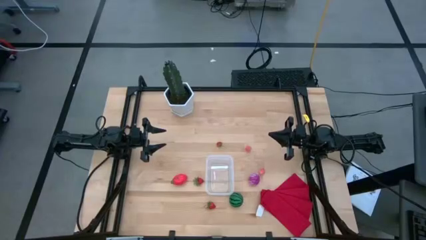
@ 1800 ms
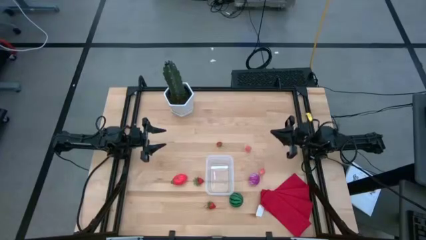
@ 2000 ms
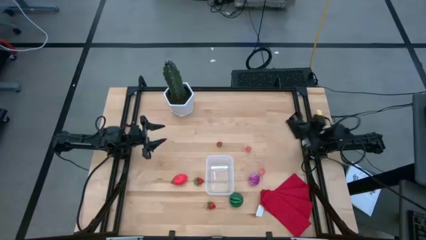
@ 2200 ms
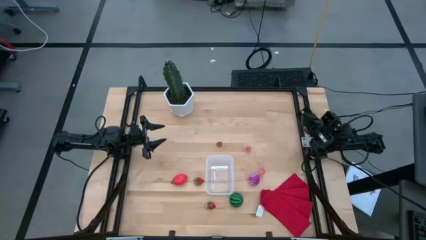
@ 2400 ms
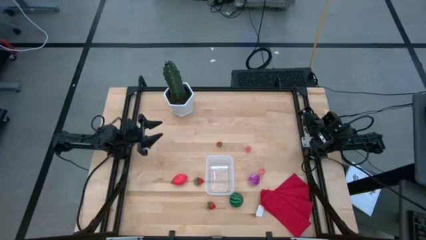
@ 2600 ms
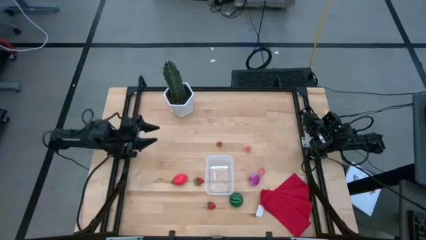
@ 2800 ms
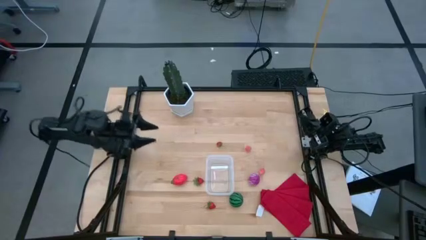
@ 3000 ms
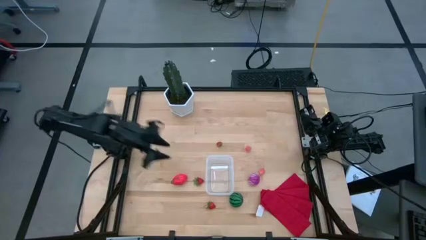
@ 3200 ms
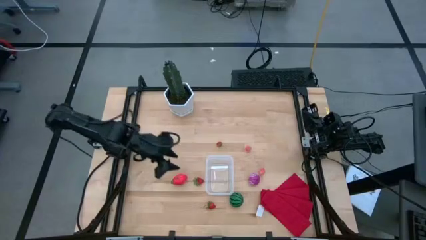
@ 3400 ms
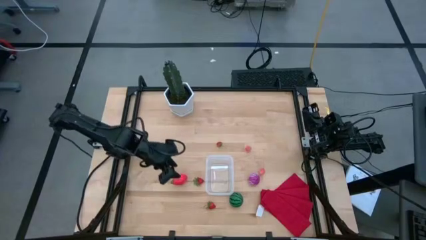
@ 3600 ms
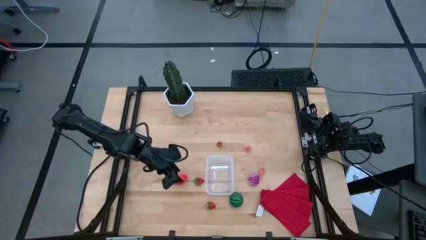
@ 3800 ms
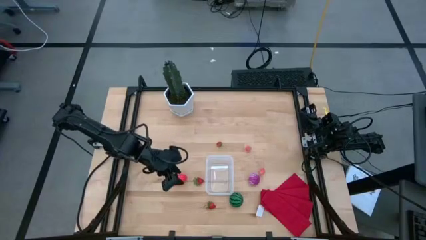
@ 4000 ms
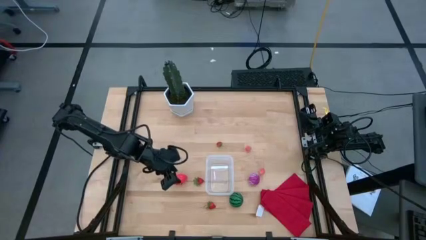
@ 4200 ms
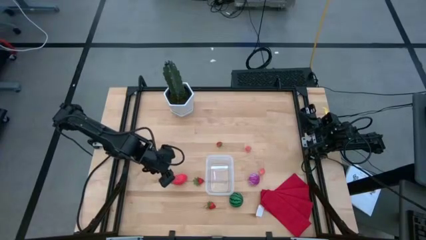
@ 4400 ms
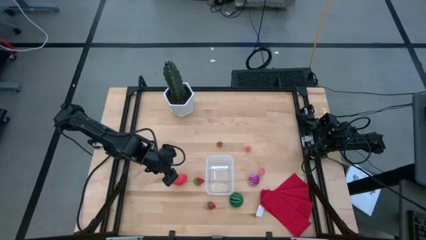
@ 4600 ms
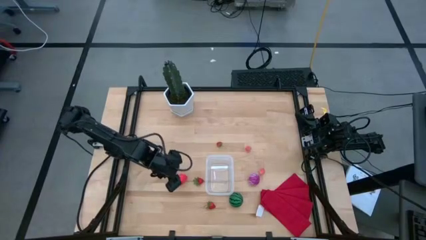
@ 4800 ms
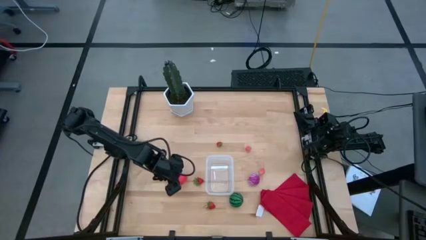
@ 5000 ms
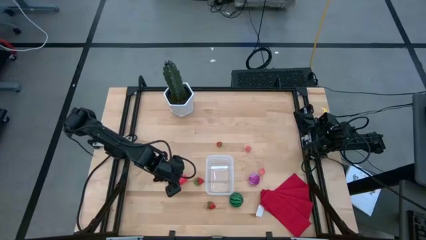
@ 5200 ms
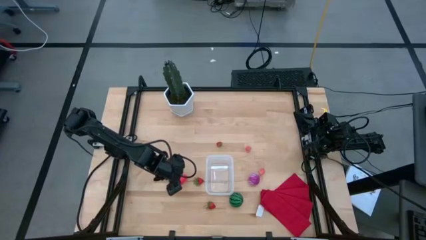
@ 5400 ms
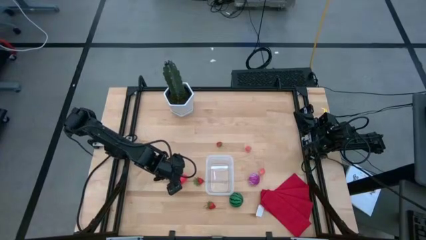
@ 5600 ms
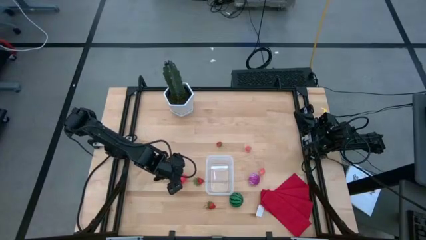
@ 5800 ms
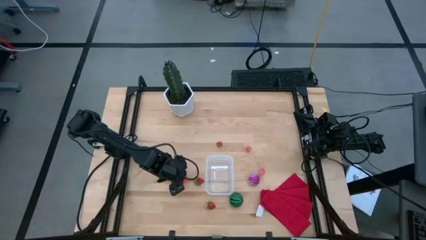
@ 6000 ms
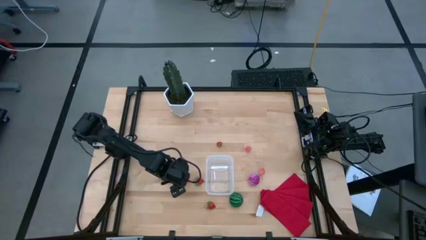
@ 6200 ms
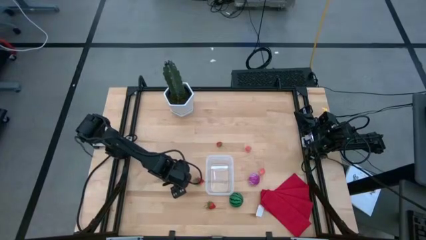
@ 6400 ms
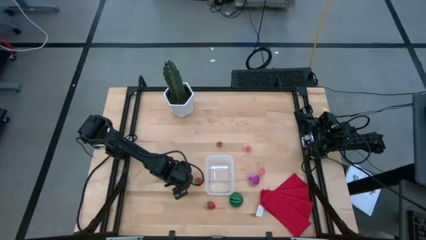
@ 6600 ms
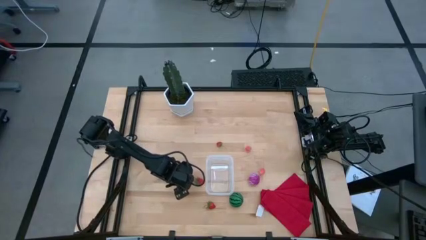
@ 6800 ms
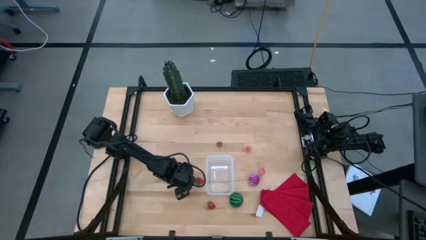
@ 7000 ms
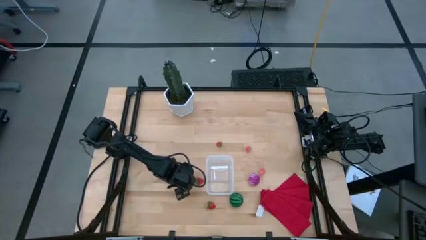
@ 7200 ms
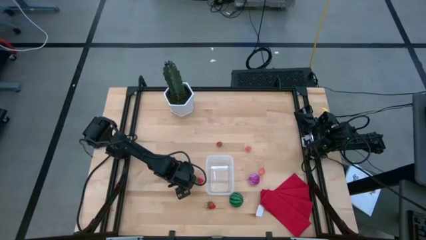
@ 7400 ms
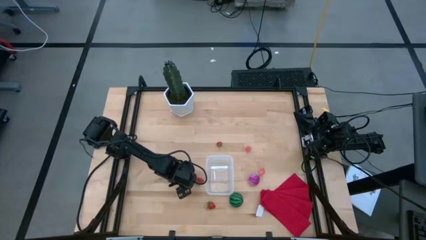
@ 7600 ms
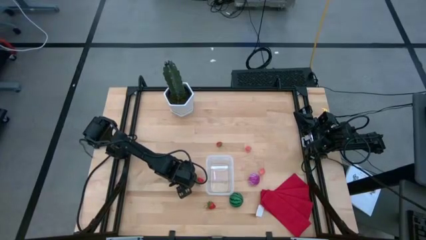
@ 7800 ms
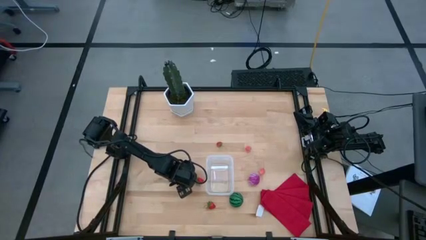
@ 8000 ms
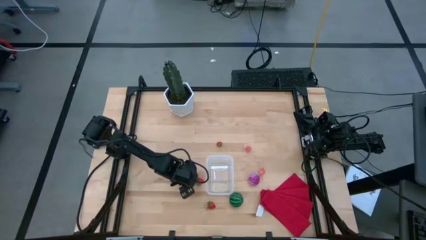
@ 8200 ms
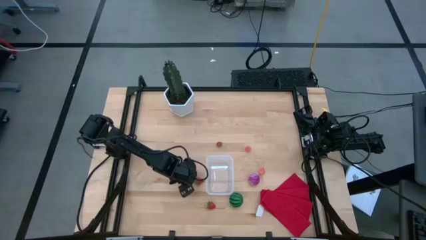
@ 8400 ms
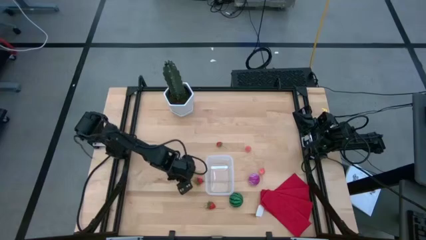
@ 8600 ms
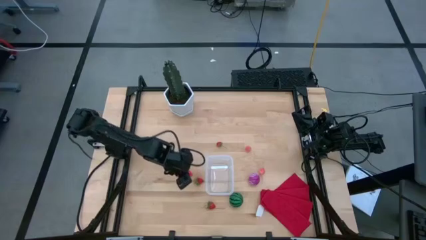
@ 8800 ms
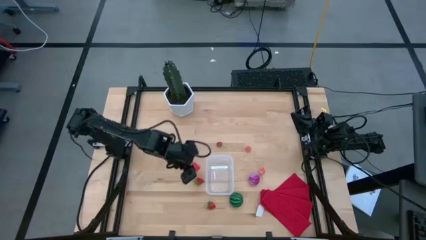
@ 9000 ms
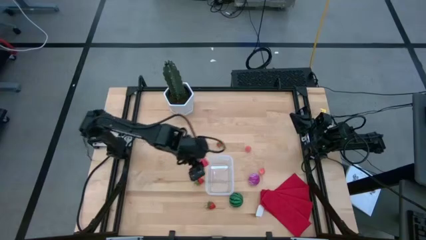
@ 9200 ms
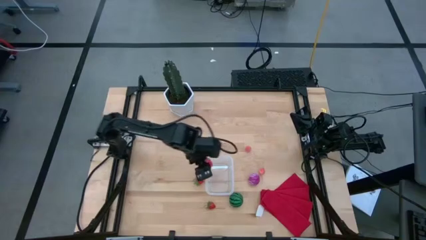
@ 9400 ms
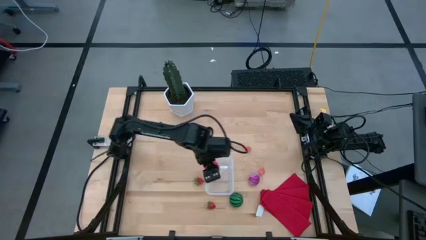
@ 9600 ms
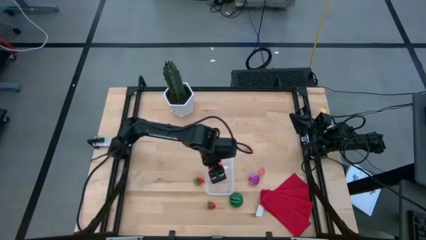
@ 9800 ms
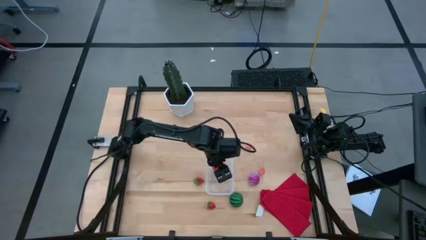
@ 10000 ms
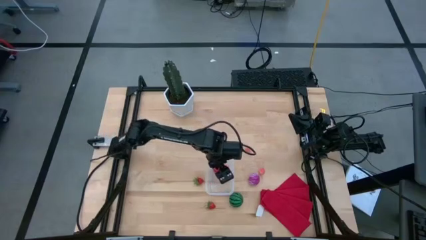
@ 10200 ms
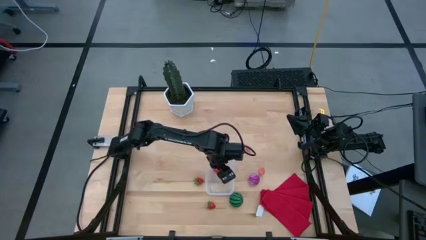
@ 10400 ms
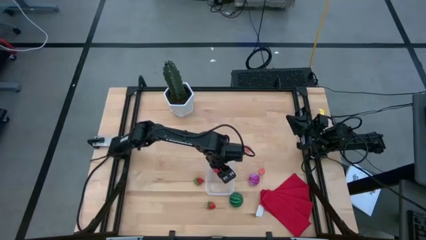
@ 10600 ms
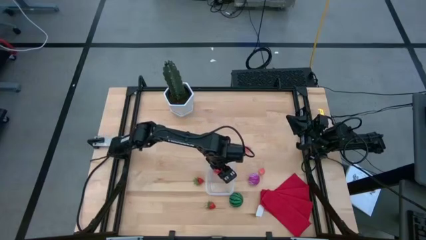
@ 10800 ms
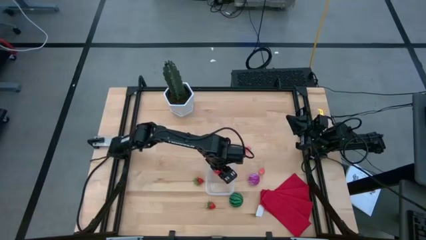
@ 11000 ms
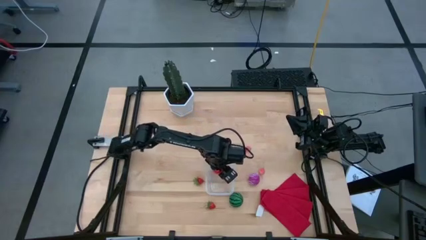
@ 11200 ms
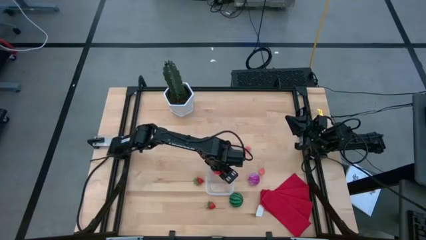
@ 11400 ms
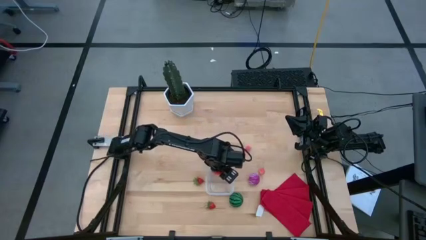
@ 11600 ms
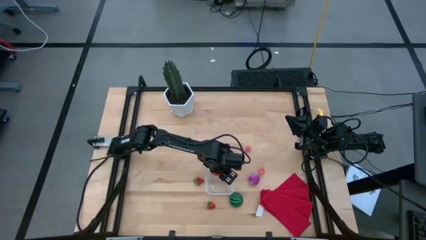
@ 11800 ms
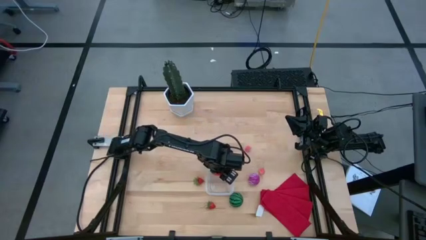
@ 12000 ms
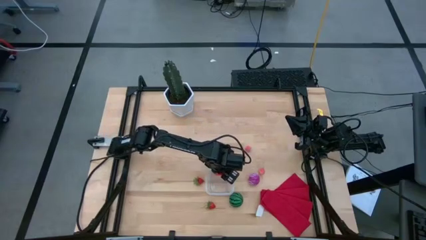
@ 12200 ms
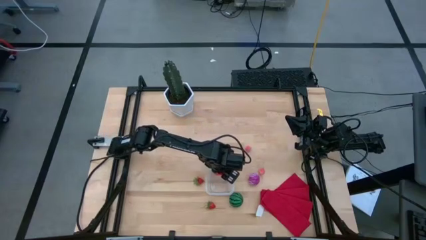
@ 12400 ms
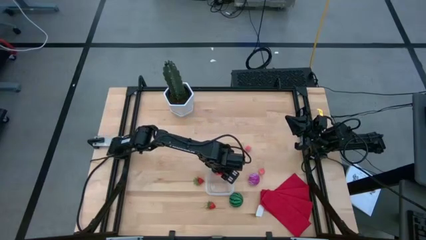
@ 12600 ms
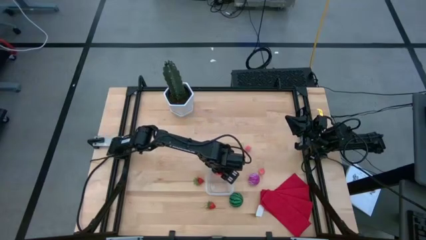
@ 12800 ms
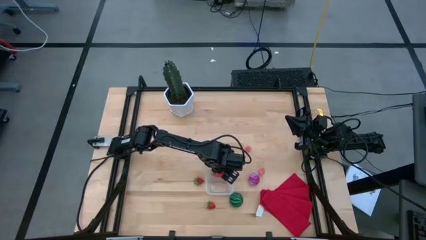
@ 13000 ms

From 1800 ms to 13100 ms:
Task: Pick and placing Produce into tupperware
Put the dragon fruit into the transparent bin
